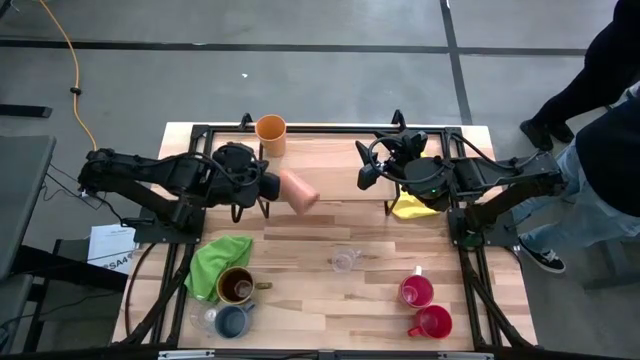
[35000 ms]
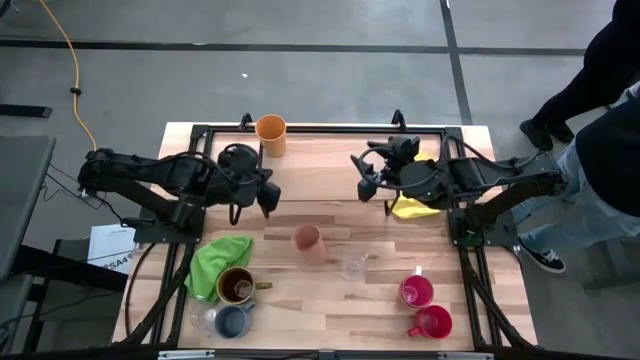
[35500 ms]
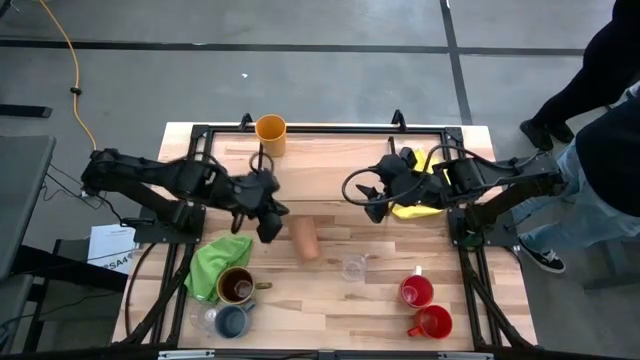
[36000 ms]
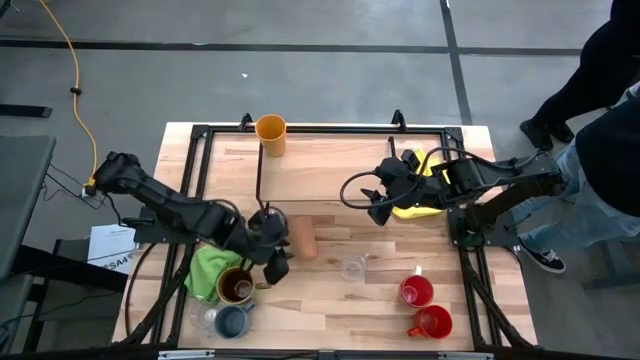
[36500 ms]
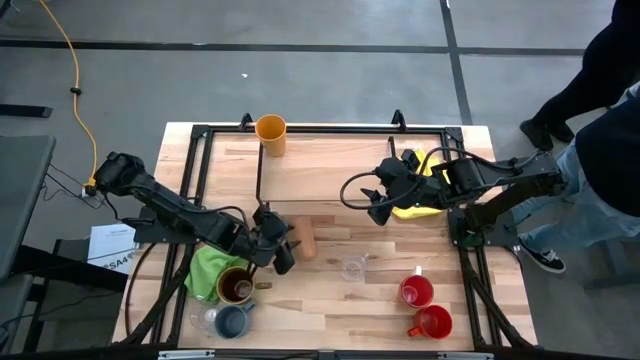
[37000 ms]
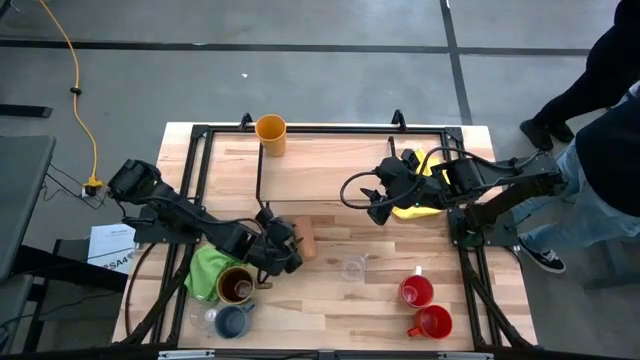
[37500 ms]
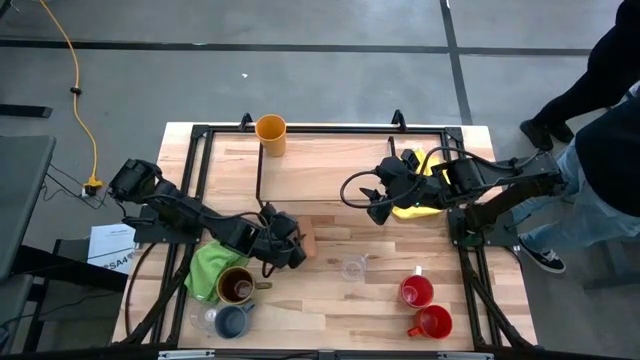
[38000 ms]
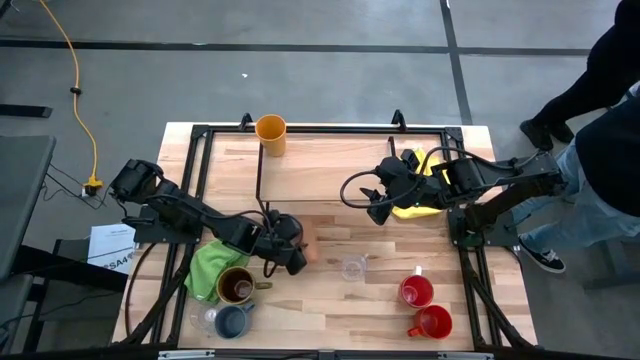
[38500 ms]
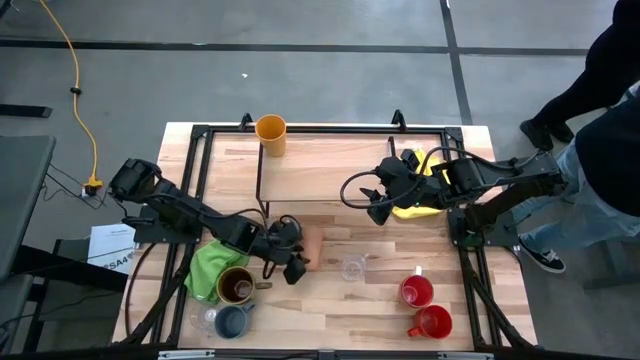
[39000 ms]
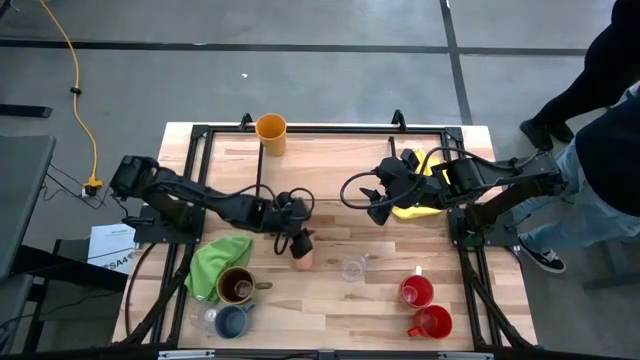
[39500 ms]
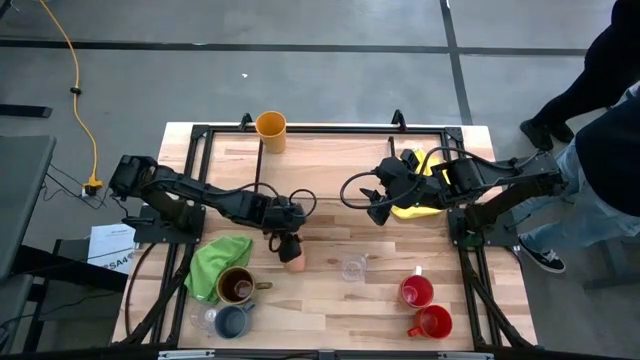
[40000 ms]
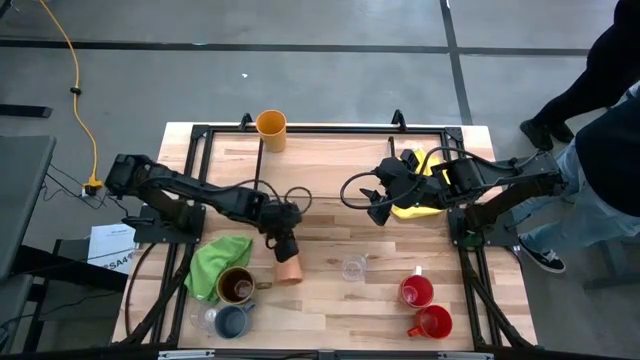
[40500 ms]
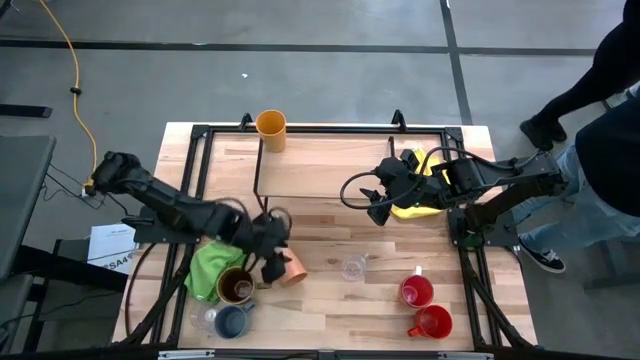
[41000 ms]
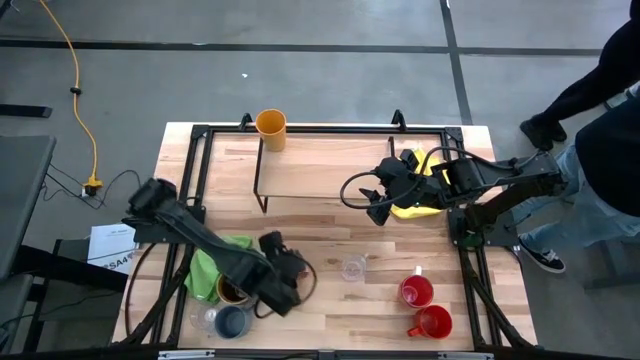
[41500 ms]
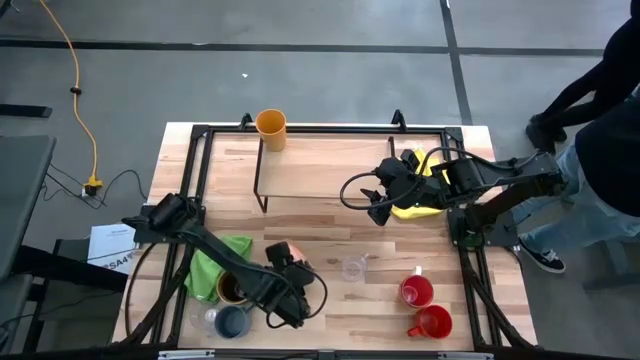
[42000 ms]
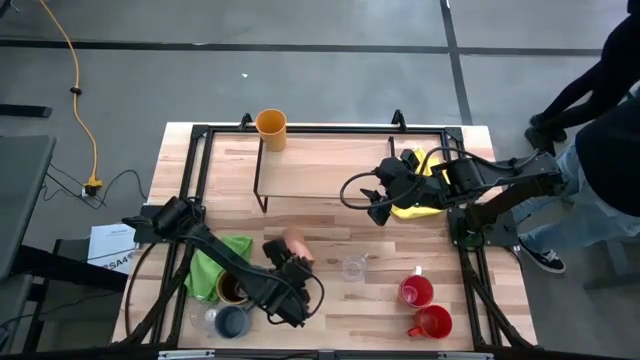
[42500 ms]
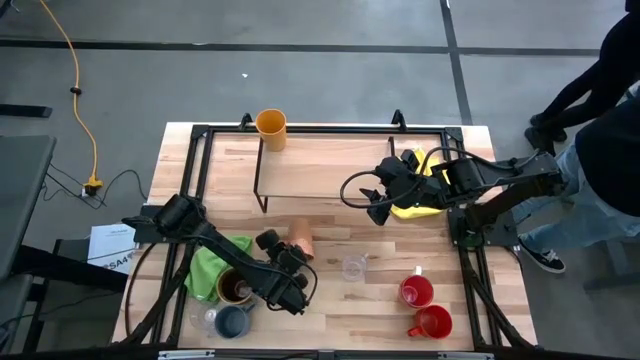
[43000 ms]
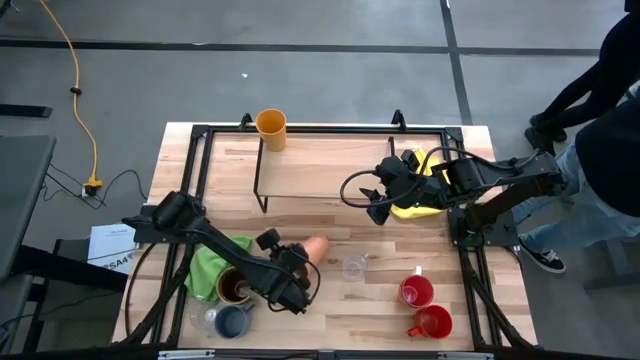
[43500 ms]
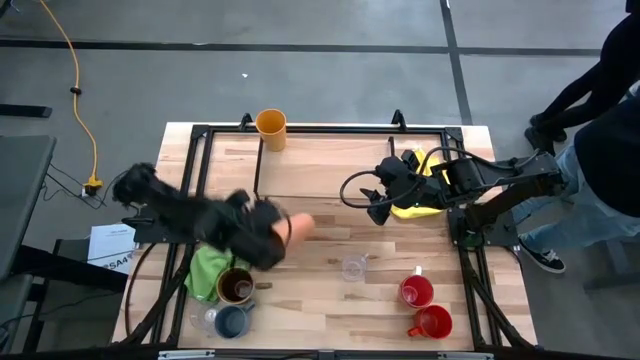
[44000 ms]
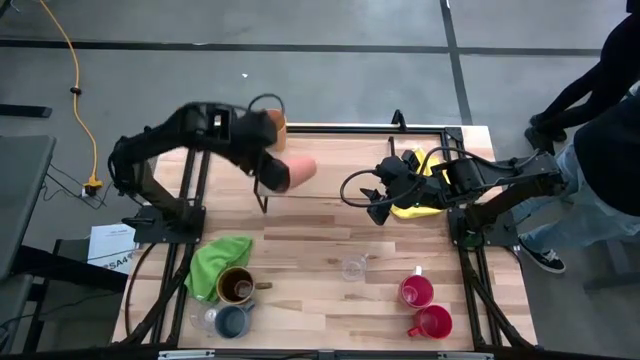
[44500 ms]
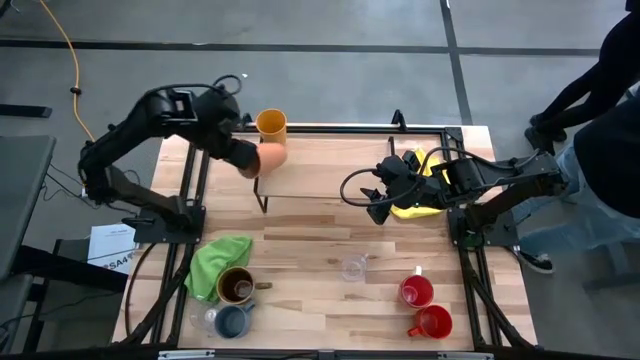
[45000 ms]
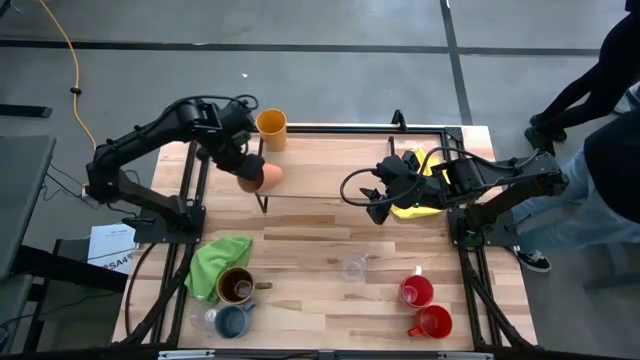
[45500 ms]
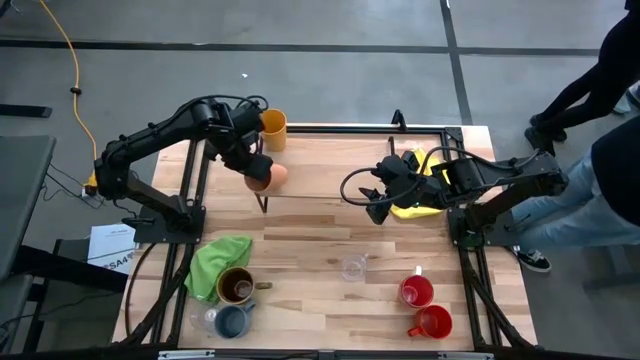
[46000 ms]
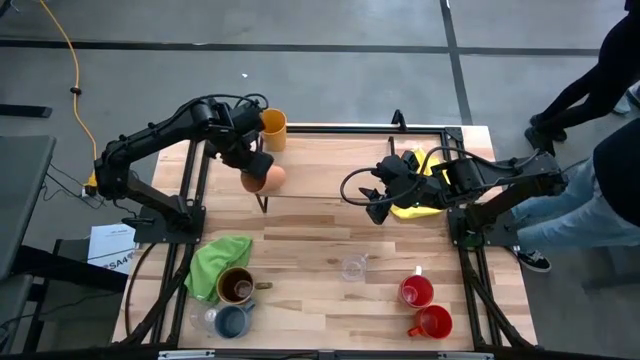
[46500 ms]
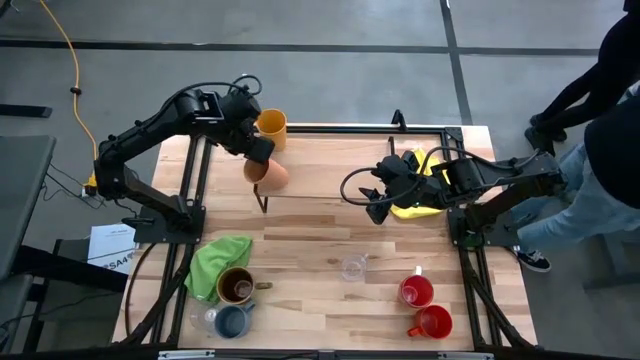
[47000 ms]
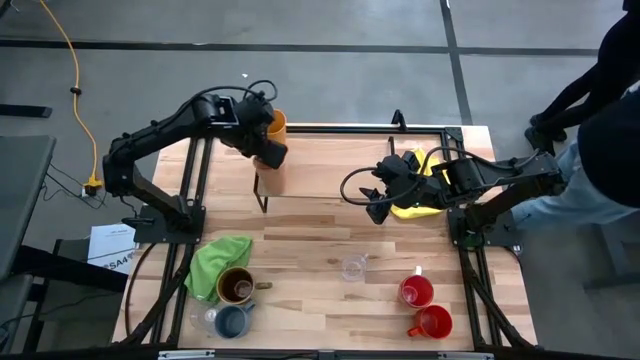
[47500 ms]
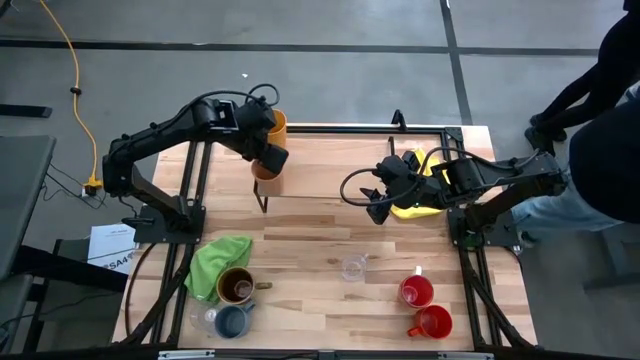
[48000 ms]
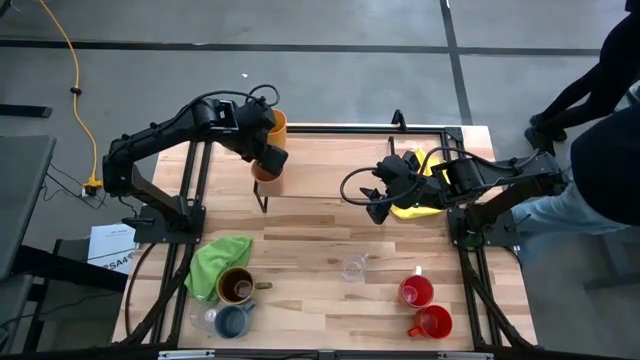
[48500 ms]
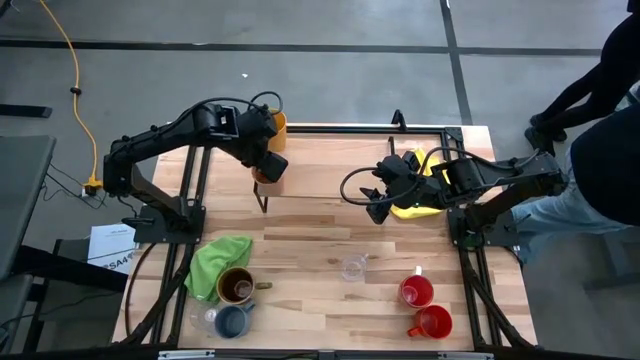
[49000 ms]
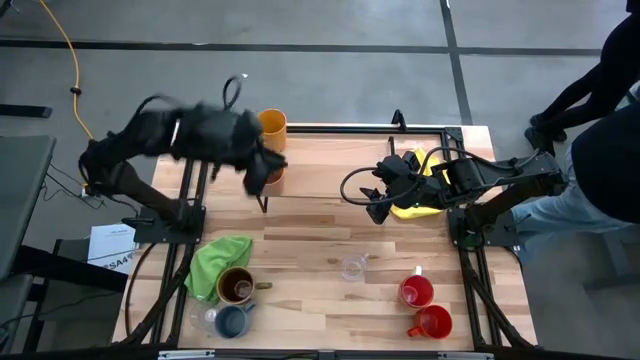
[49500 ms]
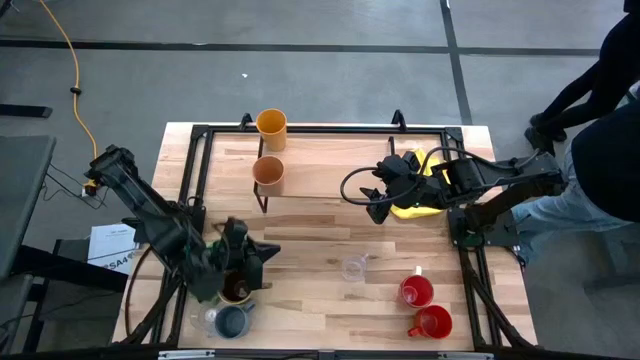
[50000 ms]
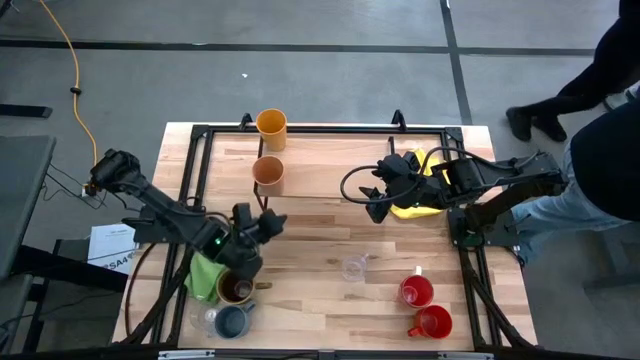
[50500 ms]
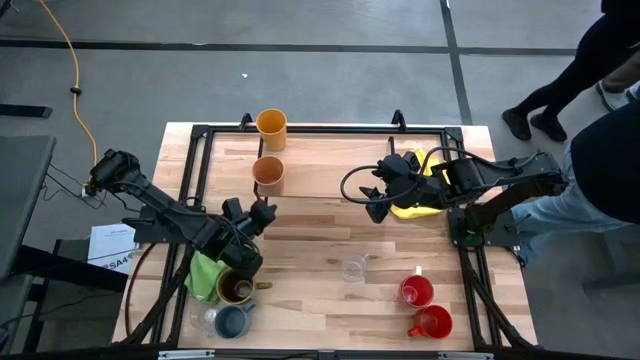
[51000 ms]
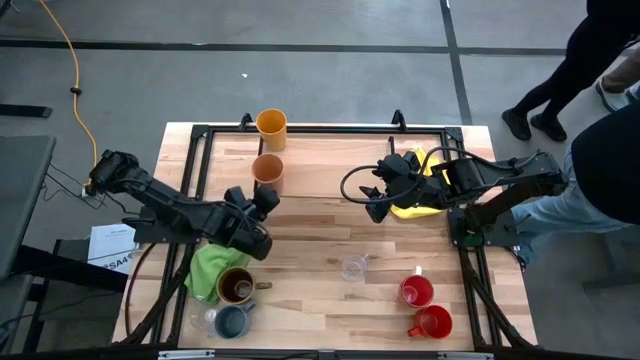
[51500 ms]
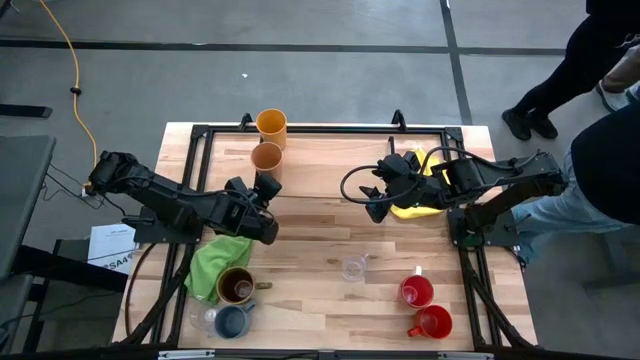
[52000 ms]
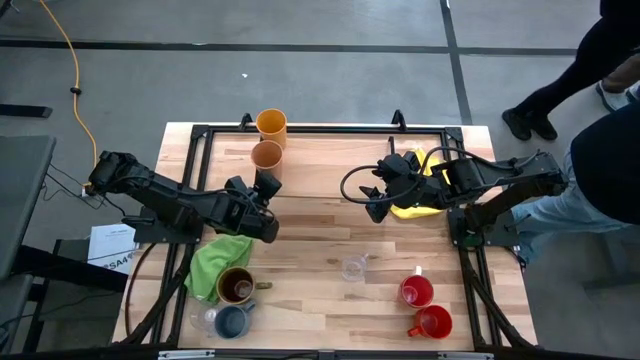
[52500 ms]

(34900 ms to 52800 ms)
Task: Stack small to large cups/mugs on shelf
Put the orange cup on the shelf

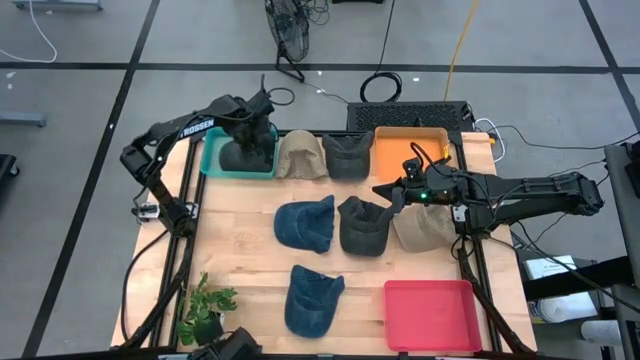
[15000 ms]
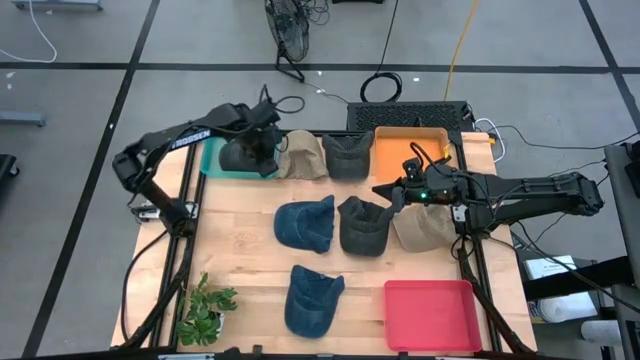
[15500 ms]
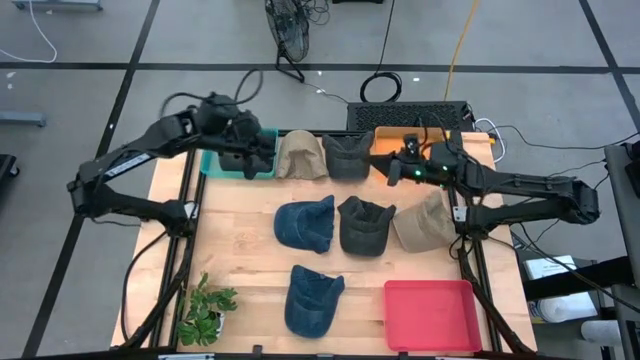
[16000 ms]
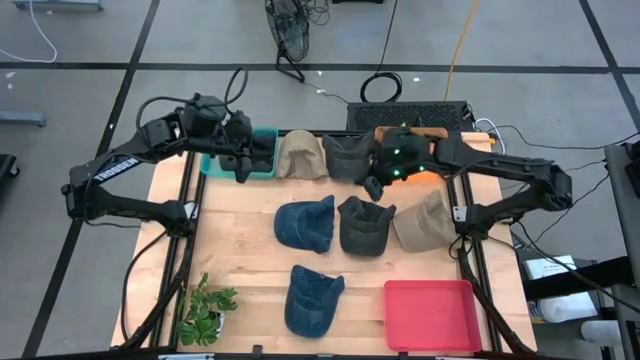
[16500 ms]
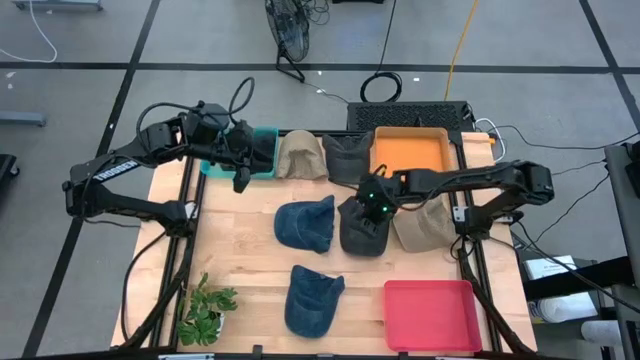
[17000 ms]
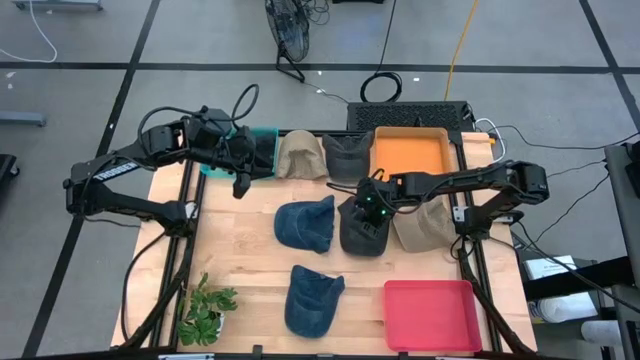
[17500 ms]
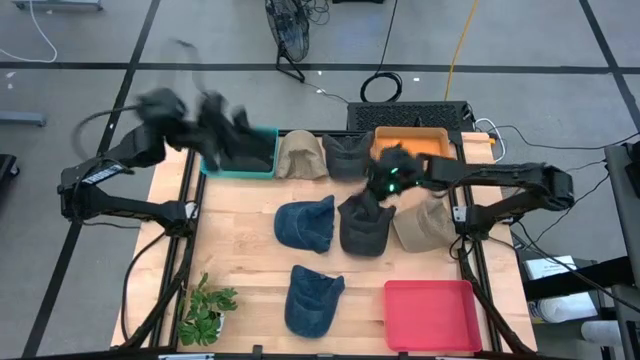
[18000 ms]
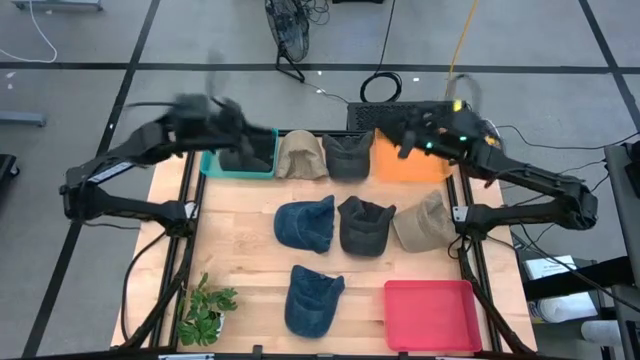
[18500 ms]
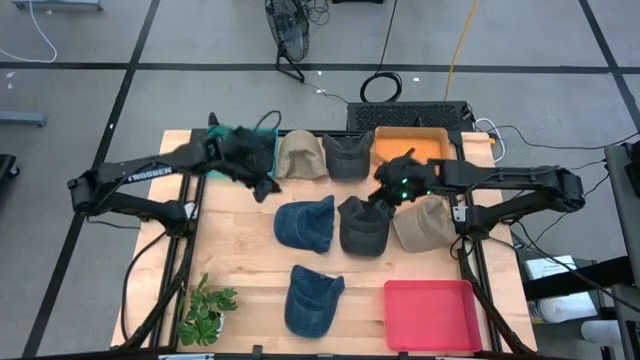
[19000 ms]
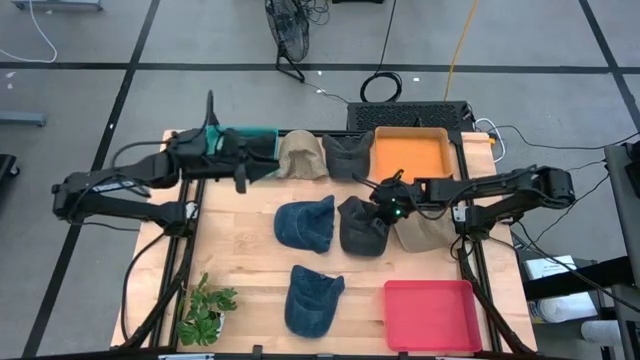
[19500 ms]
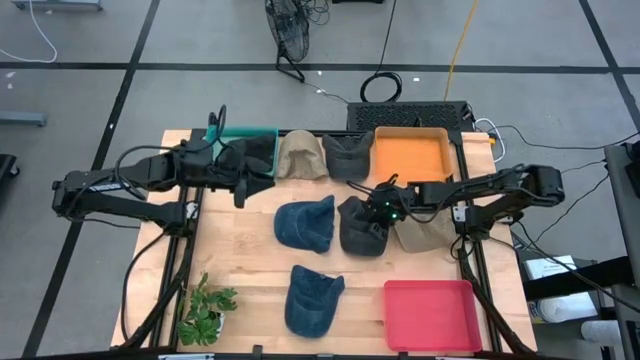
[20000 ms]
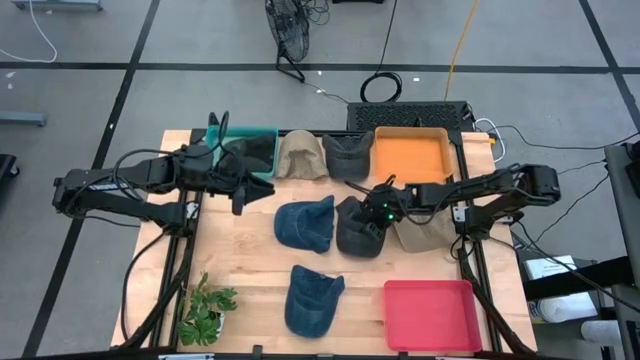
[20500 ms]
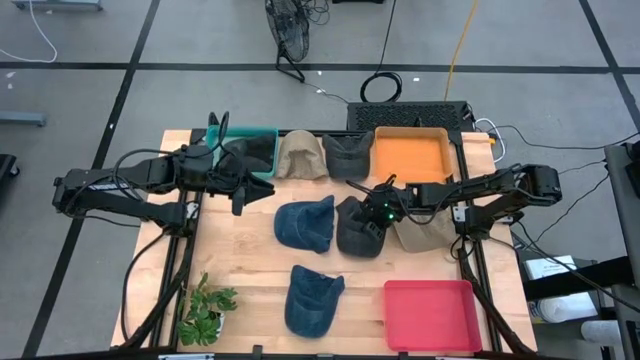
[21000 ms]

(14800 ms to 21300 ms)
Task: Pick & Place hat
Put the bottom black cap into the green bin
